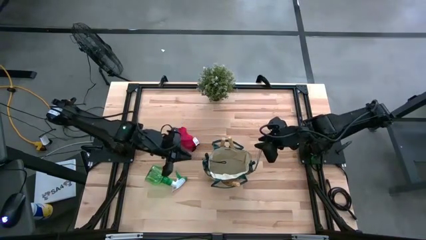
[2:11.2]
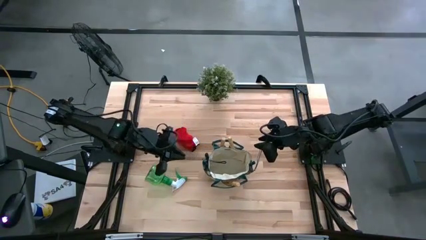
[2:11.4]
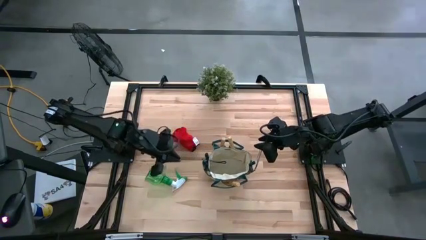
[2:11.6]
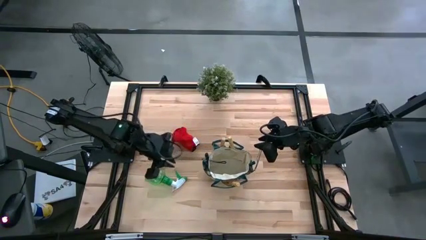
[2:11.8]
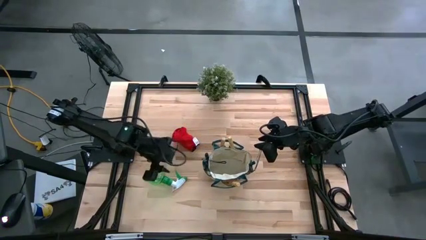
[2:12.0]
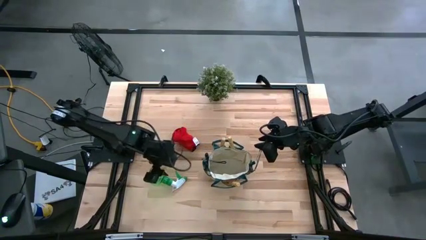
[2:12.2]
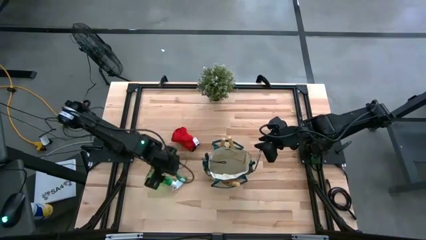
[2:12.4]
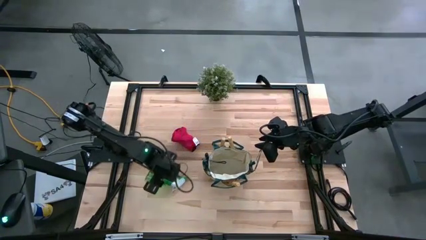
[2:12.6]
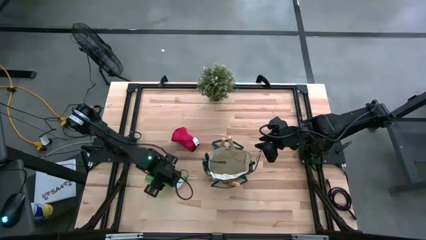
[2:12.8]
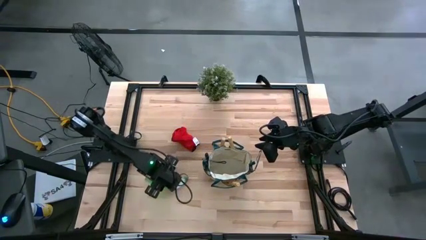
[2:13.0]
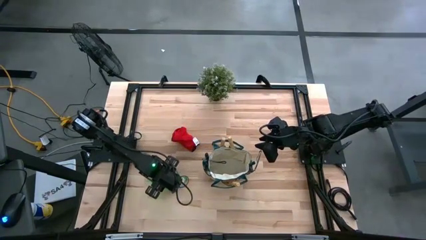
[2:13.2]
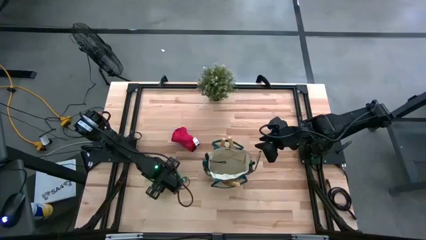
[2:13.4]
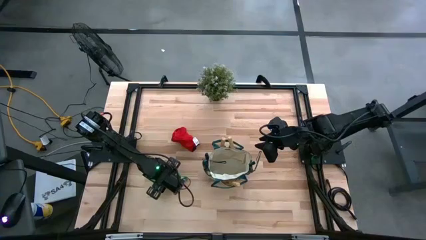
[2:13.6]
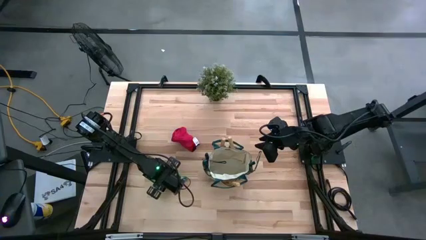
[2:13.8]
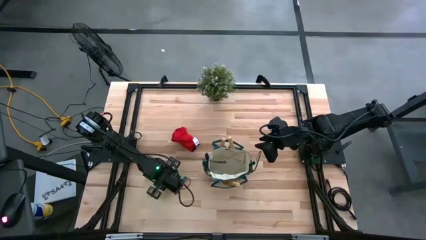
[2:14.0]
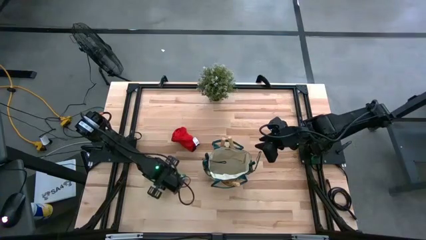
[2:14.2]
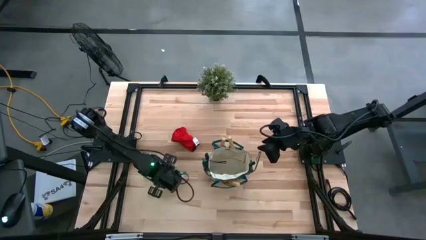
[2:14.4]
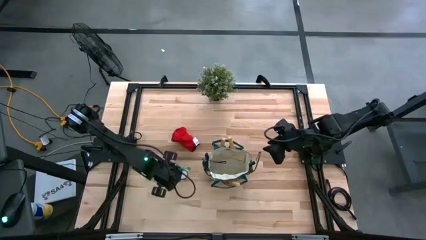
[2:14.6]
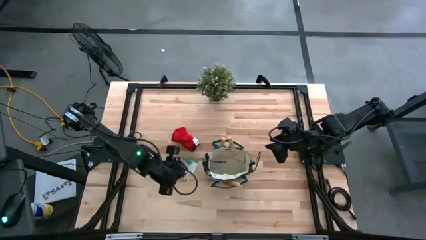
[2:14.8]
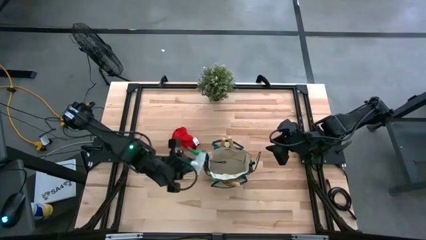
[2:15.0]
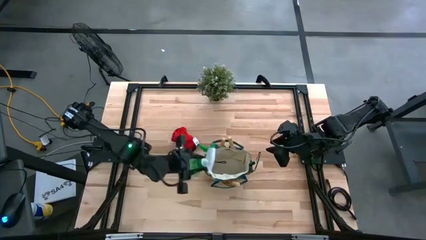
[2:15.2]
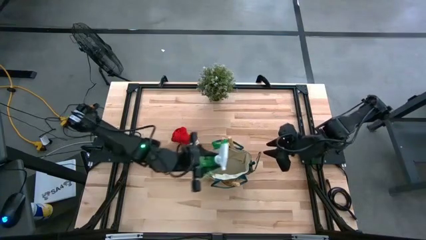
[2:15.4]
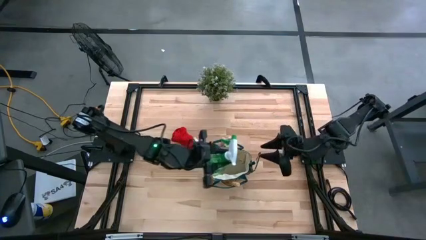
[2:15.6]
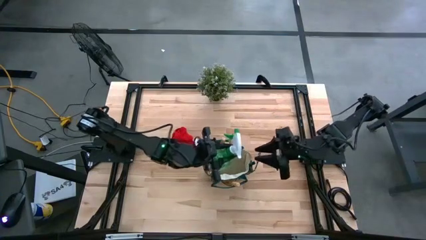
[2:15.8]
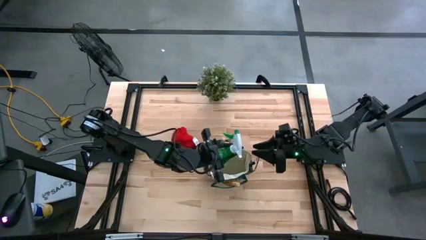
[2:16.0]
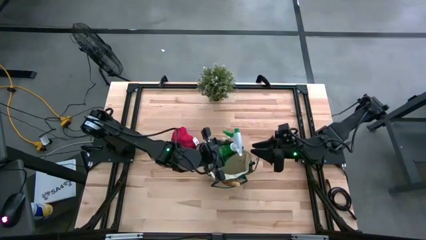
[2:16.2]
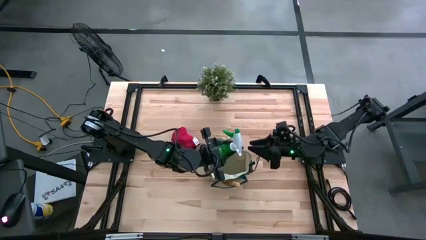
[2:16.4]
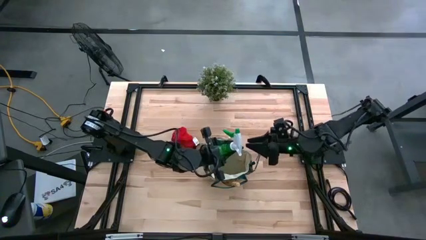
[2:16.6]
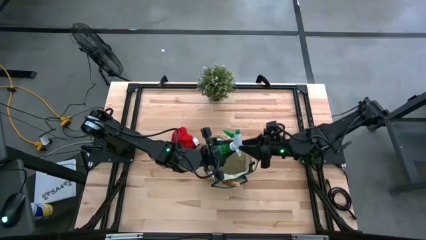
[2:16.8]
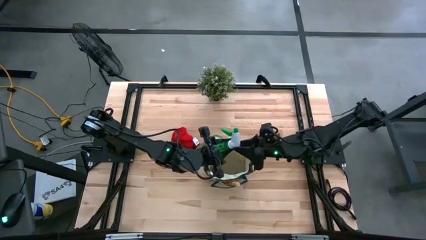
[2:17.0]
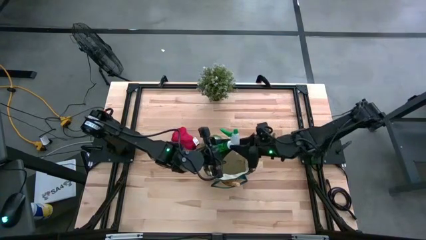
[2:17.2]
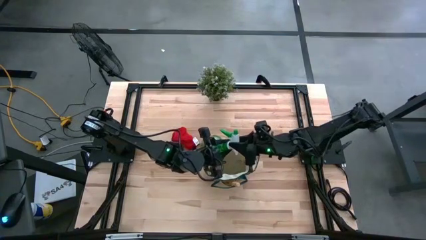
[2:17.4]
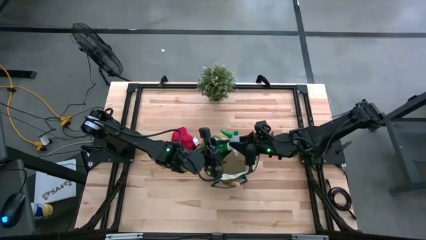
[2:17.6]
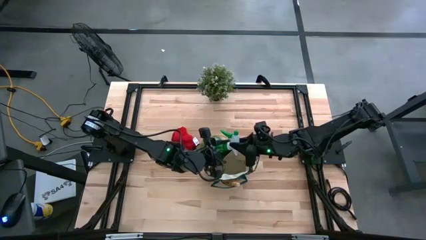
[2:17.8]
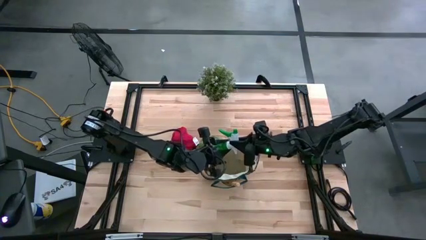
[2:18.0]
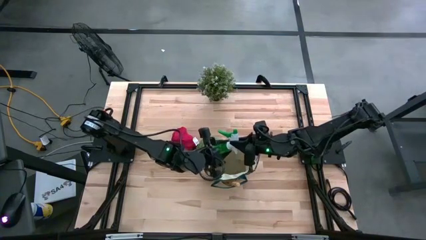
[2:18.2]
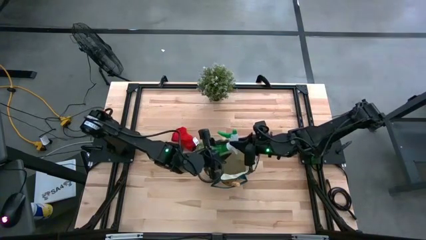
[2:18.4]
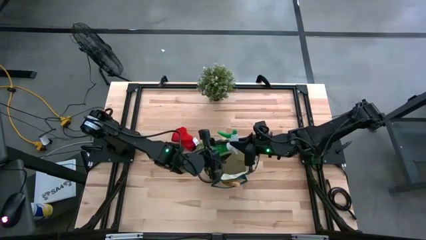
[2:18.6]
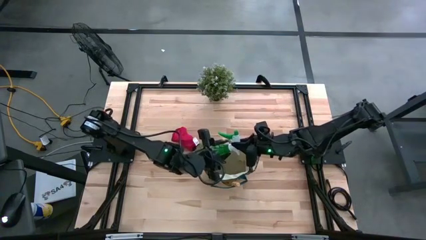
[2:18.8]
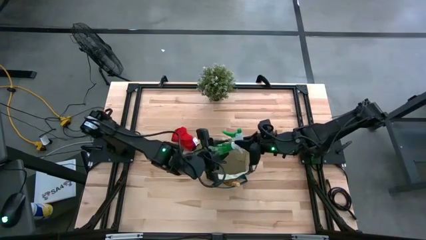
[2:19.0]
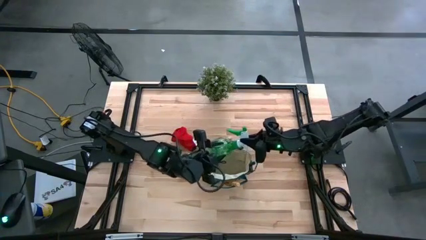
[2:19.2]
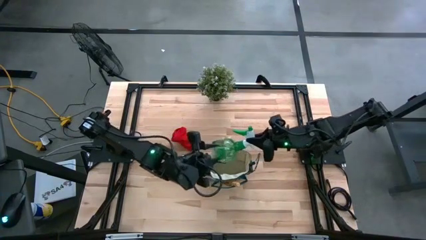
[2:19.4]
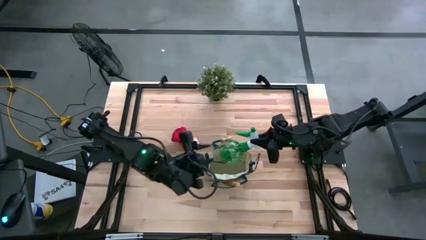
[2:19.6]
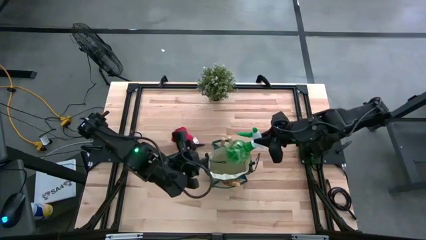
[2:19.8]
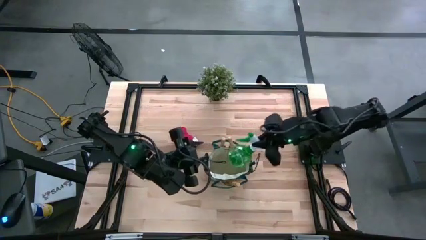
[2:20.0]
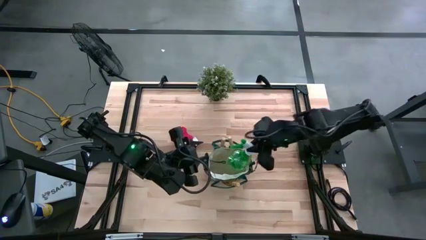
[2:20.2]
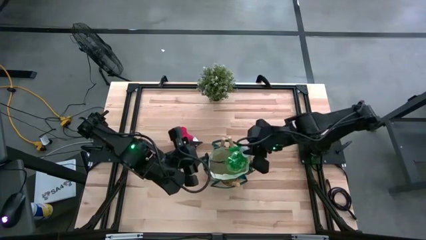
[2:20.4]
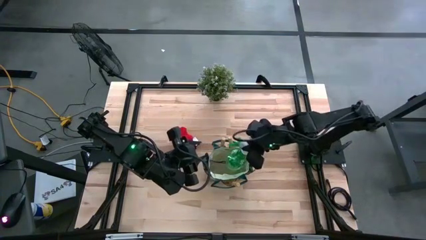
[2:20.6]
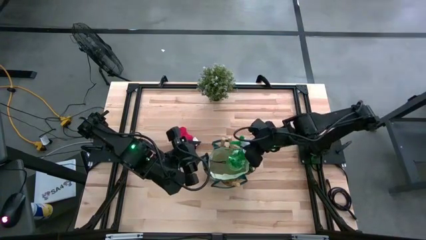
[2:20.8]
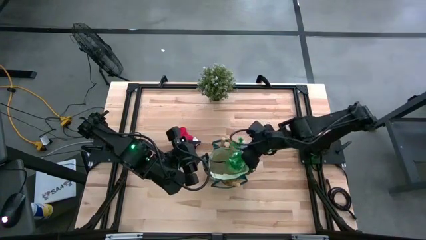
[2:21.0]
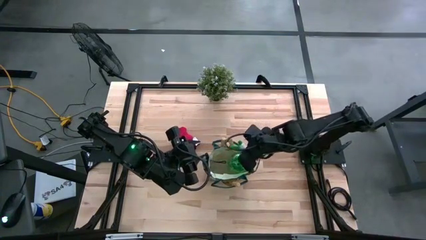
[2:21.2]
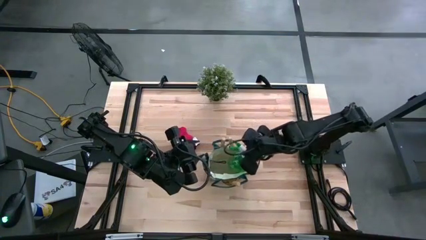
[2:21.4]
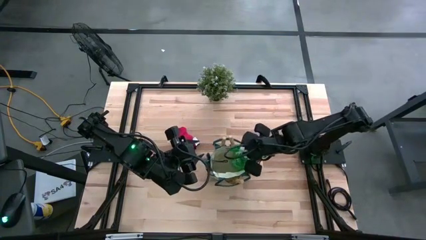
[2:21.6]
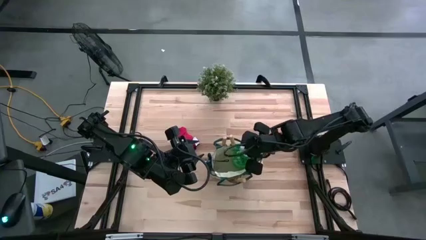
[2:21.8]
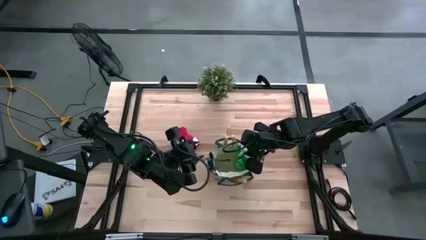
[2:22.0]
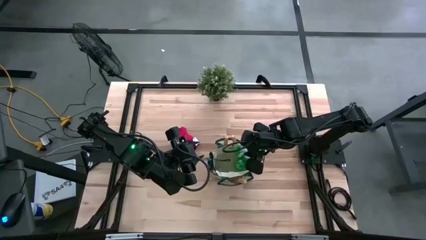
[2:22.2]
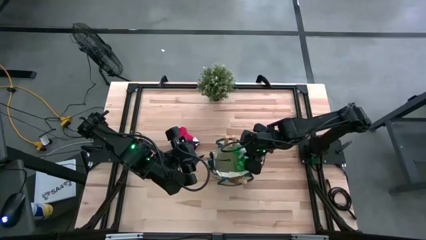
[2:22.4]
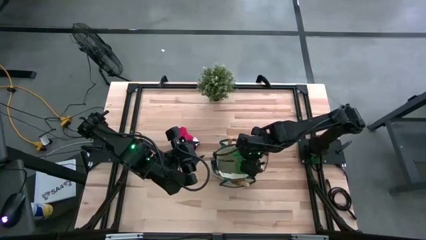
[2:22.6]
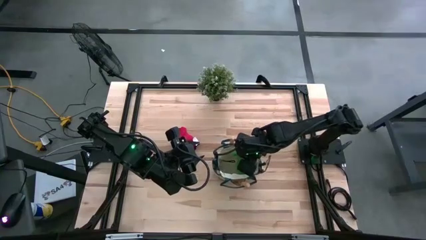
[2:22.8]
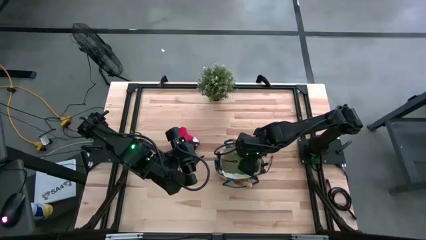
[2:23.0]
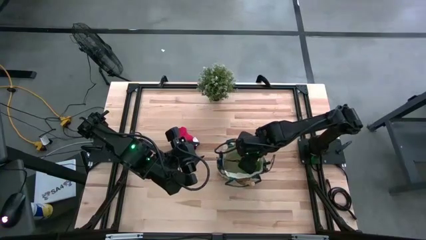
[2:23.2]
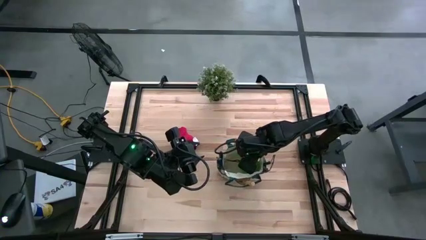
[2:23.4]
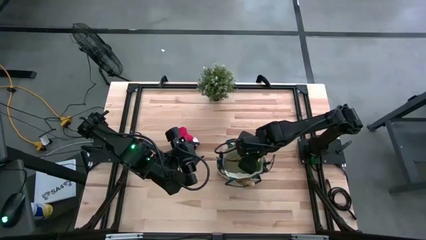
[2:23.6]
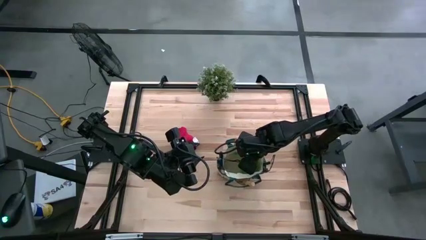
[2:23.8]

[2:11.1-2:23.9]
Task: Pick & Place Garden tools in Gardening bag
Put the spray bottle into the gardening bag

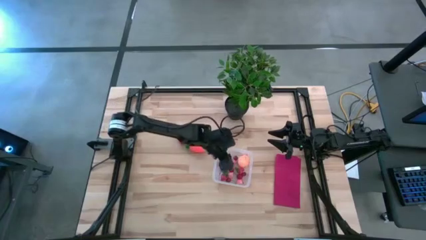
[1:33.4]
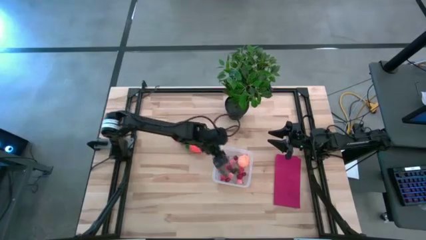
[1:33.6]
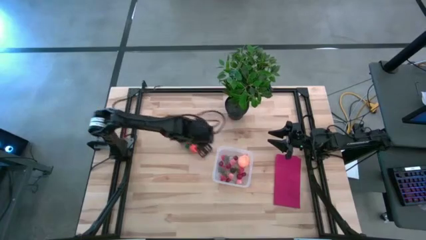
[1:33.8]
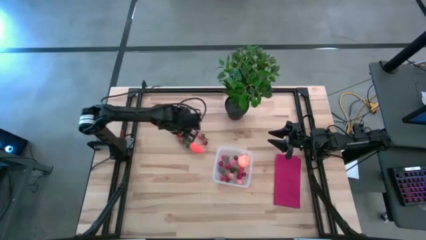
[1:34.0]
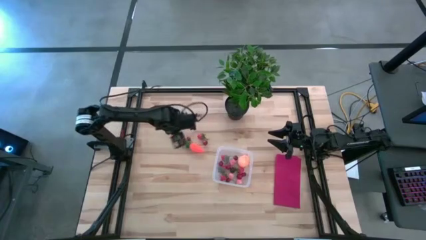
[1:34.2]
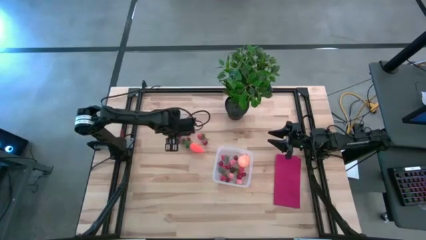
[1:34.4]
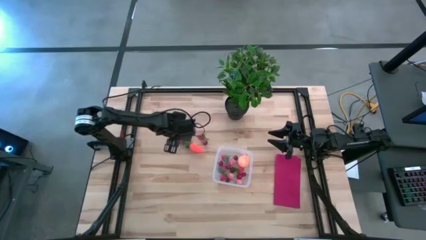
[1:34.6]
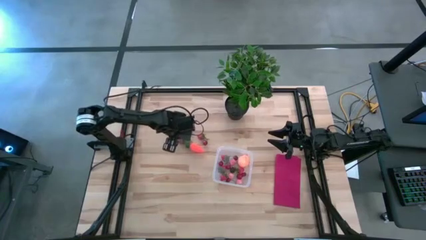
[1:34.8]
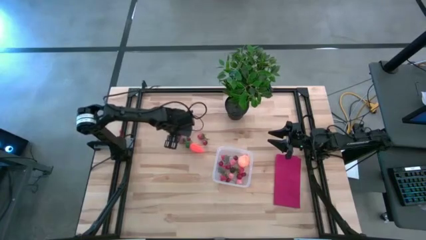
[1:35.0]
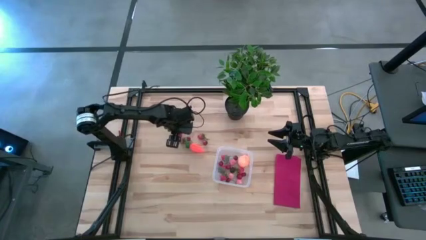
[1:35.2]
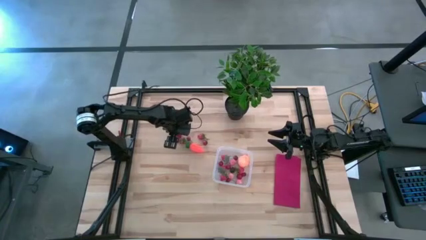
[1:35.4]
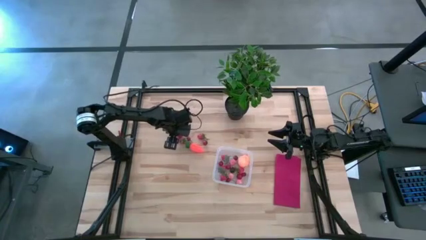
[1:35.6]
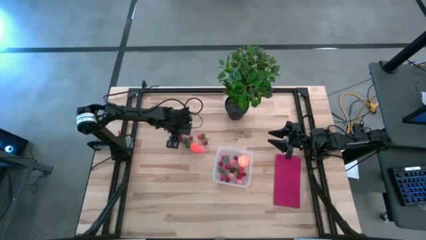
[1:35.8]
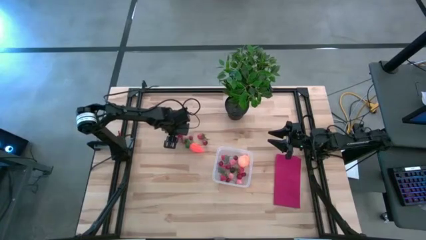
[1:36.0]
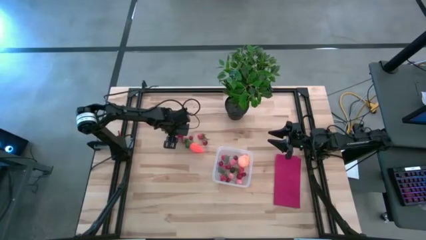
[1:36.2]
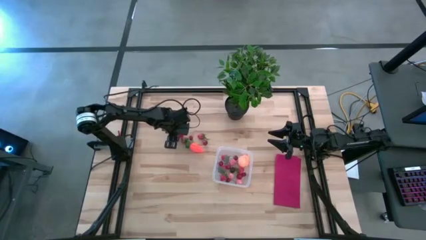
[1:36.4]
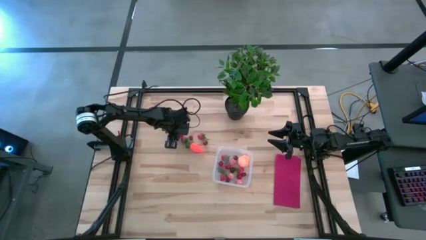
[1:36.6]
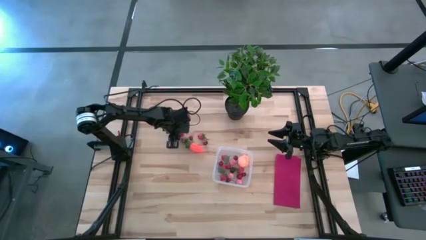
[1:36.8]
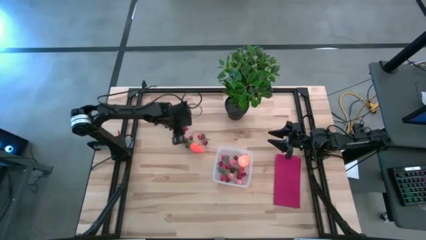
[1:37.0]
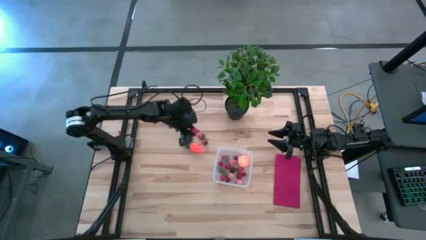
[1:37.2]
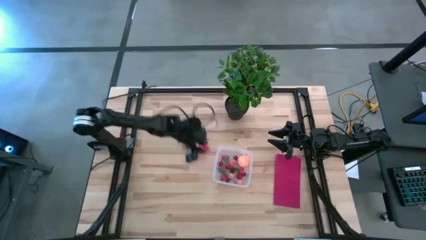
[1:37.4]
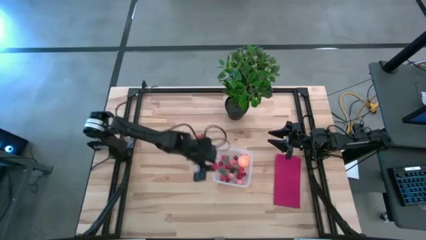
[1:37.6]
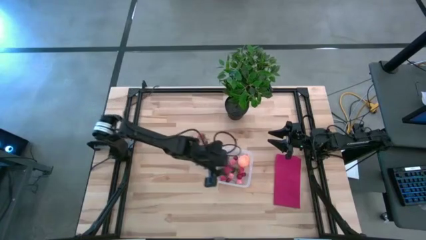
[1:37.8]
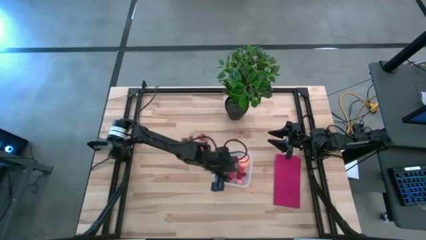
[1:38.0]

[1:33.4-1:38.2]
Task: Pick and placing Produce into tupperware
Put the red strawberry into the transparent bin
